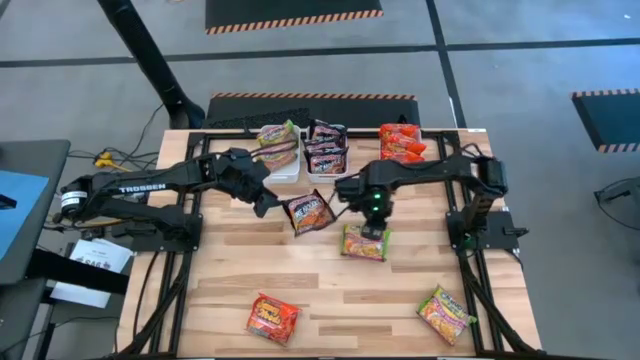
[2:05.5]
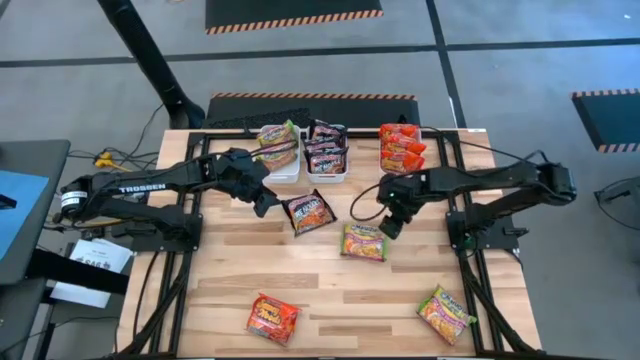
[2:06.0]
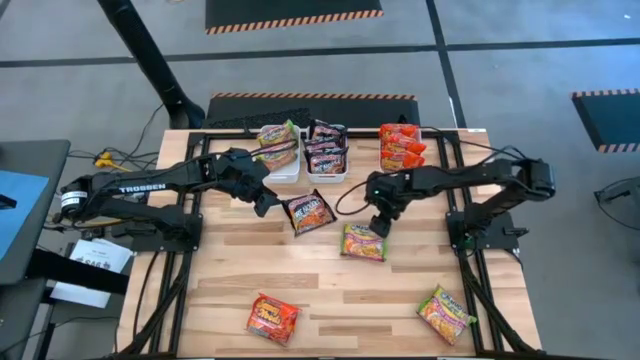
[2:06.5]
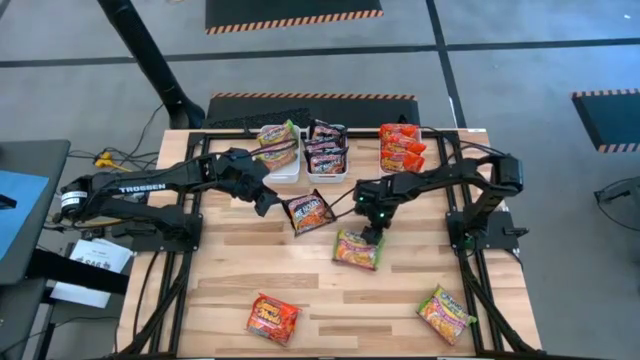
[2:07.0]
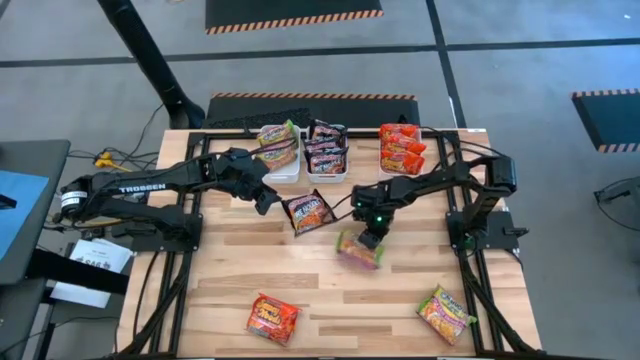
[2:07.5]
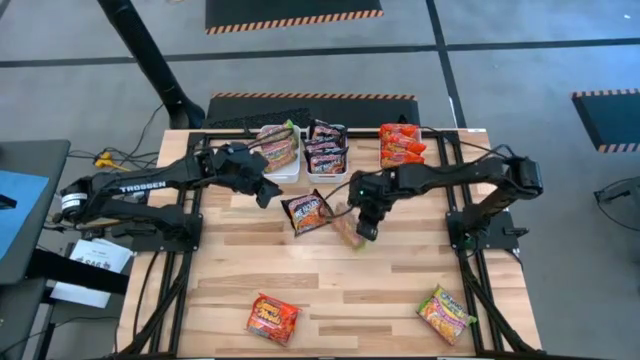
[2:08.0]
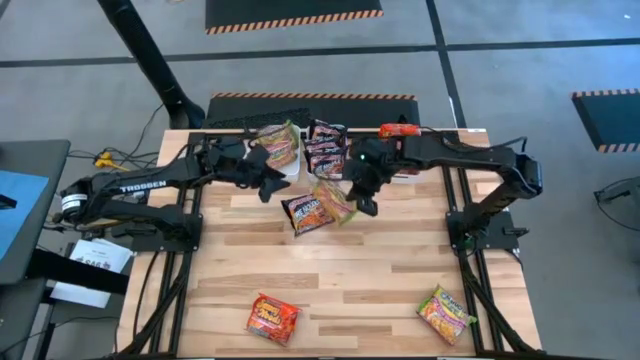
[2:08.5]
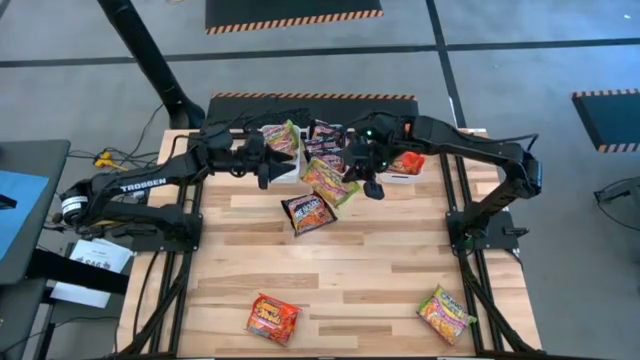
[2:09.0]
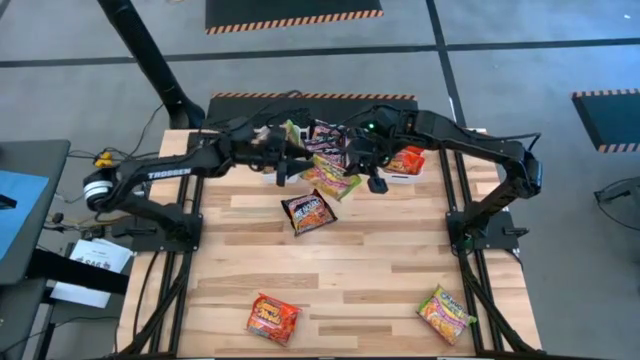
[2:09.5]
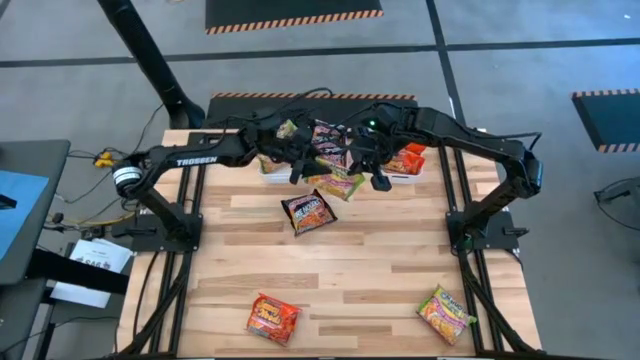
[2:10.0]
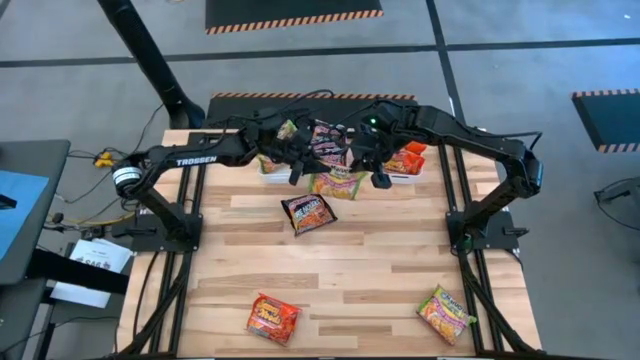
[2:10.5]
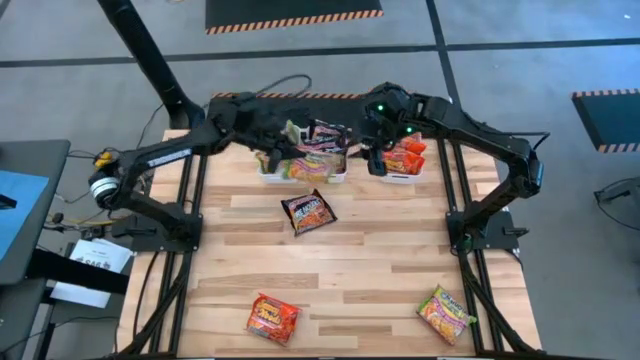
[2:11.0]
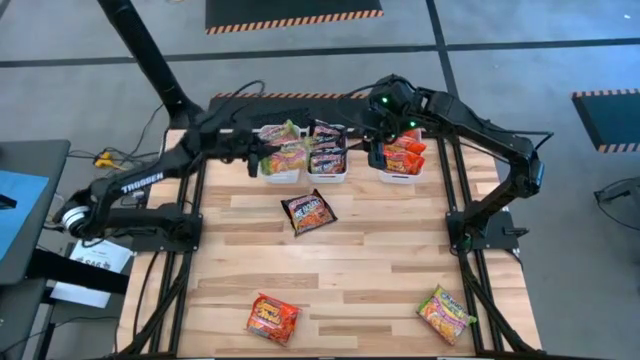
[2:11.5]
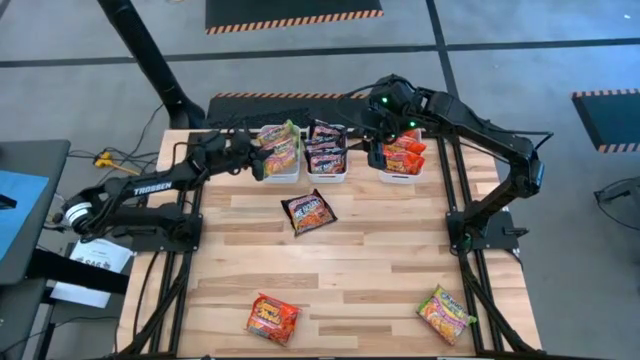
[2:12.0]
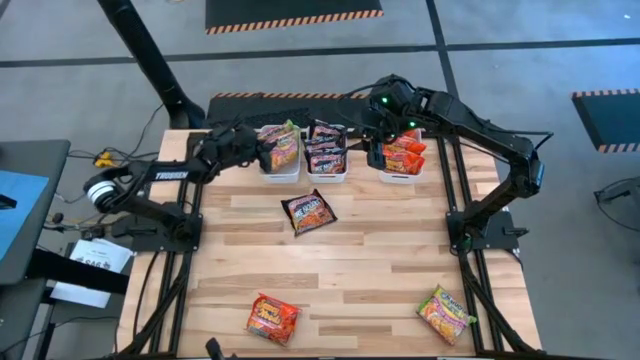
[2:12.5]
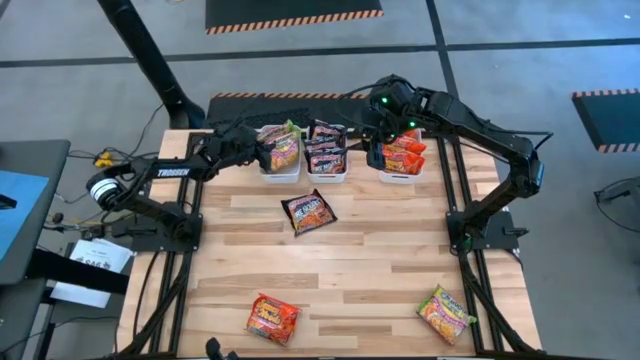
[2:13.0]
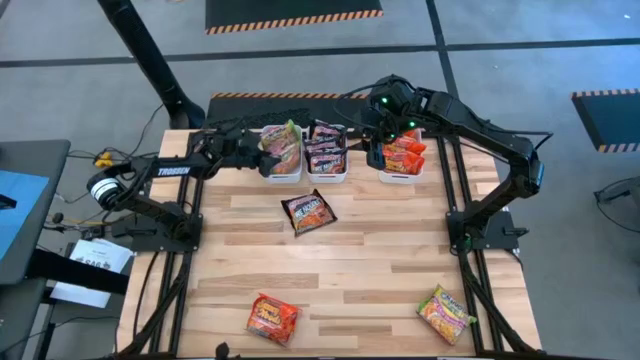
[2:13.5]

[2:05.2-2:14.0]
Task: Sort Maruchan noodles
Put the green noodle pack into the left white bin

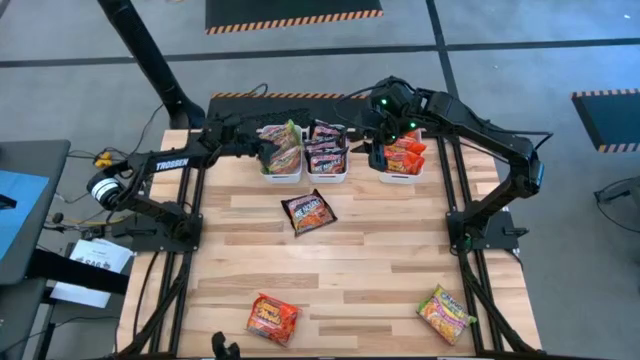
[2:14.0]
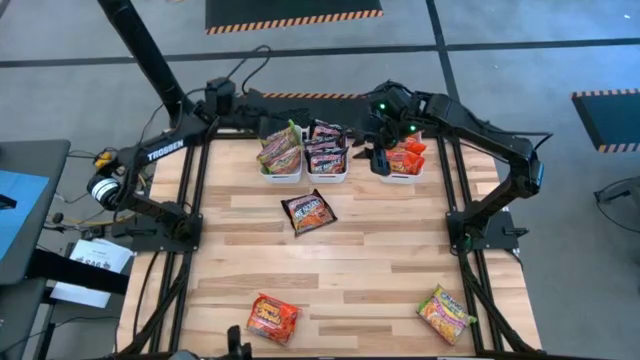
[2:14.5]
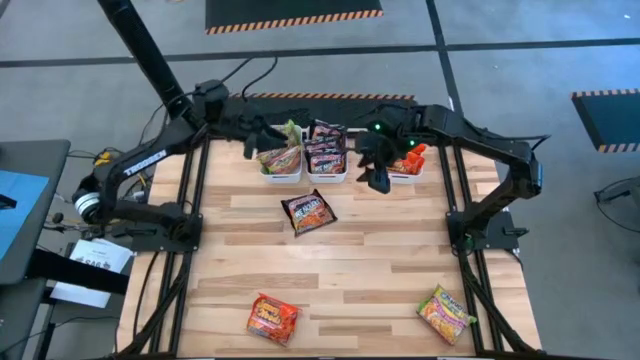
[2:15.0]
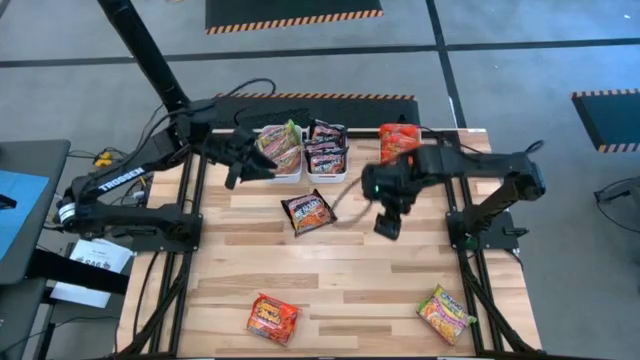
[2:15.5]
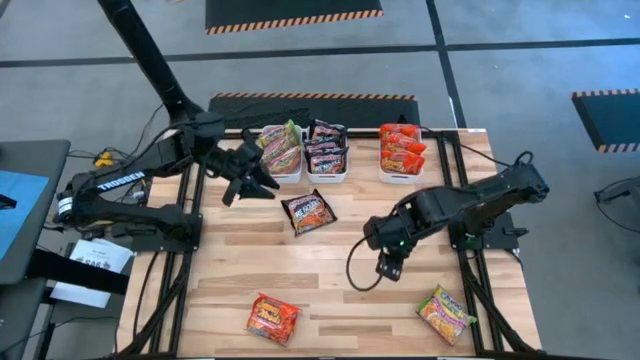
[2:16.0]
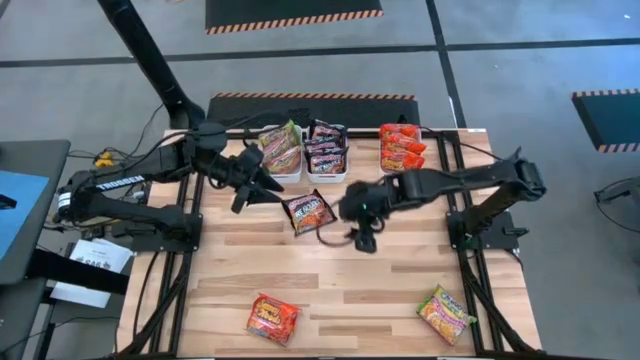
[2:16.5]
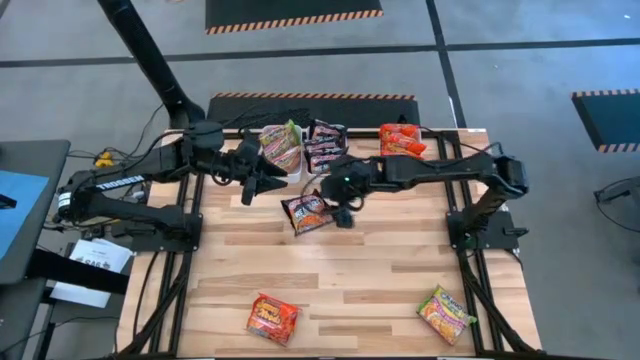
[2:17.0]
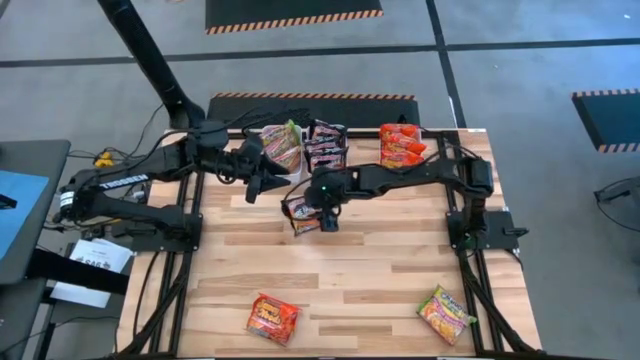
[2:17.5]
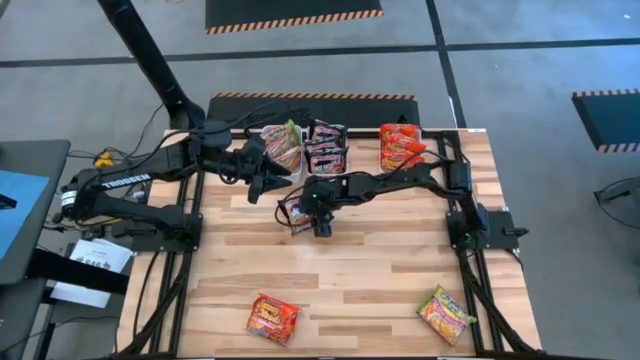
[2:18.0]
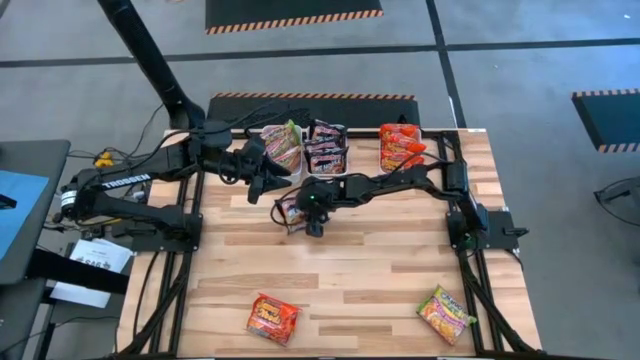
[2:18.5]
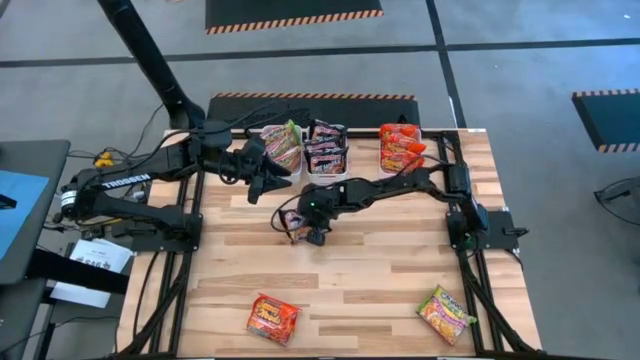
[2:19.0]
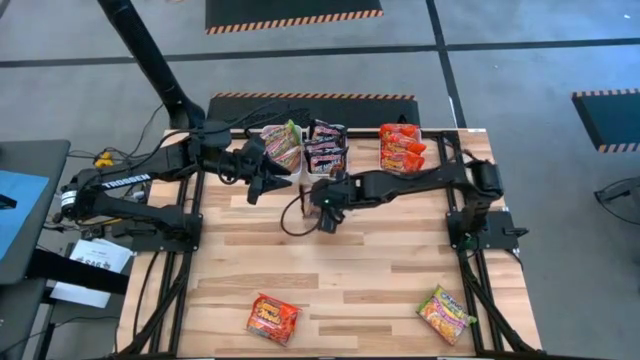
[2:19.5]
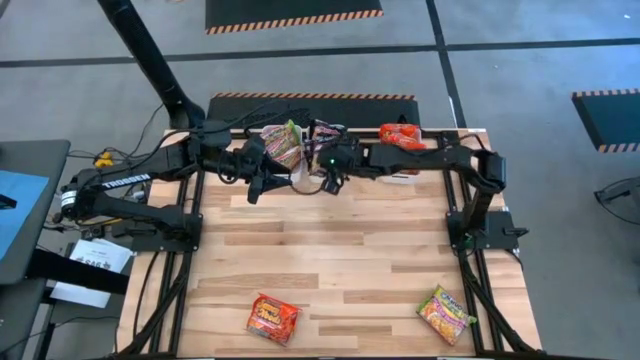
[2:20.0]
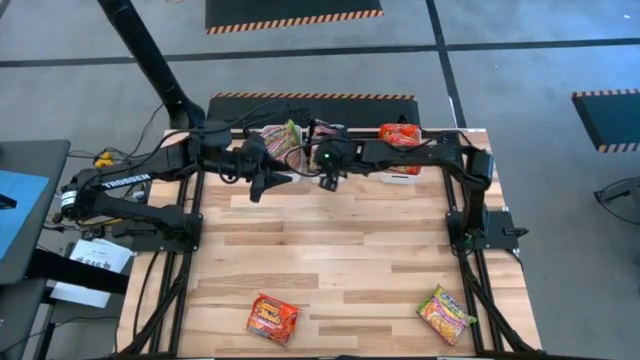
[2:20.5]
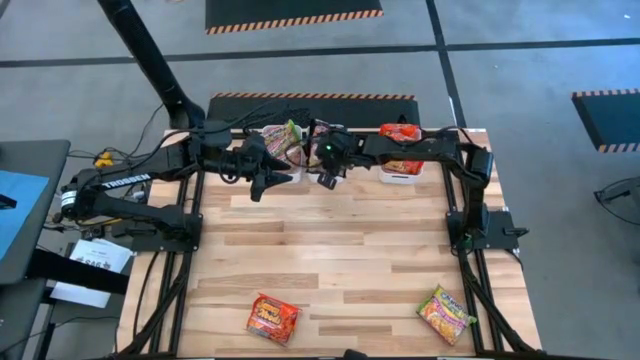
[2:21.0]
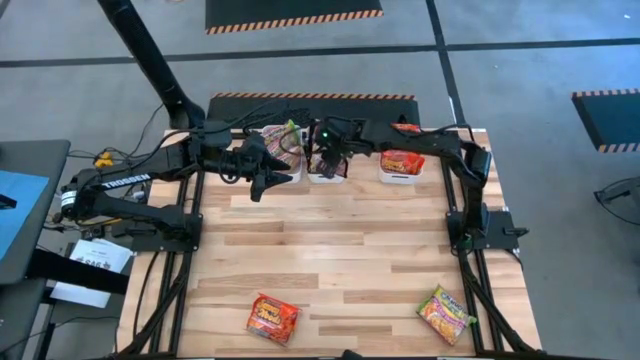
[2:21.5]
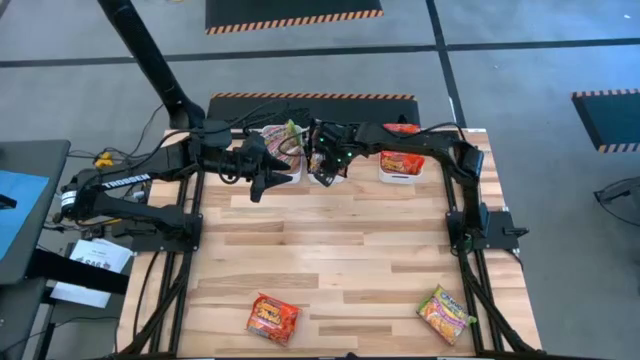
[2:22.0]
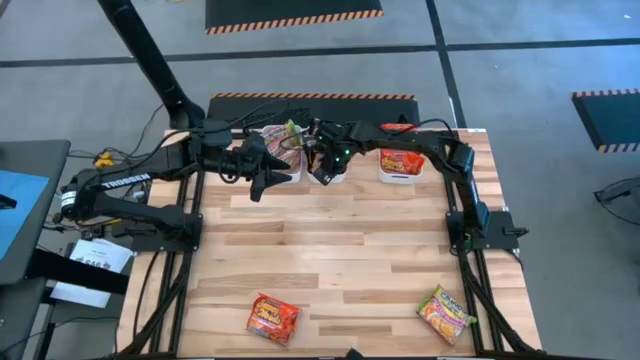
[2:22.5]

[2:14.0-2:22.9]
Put the black noodle pack into the middle white bin

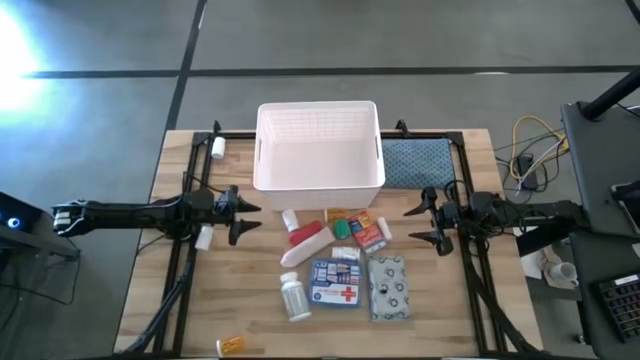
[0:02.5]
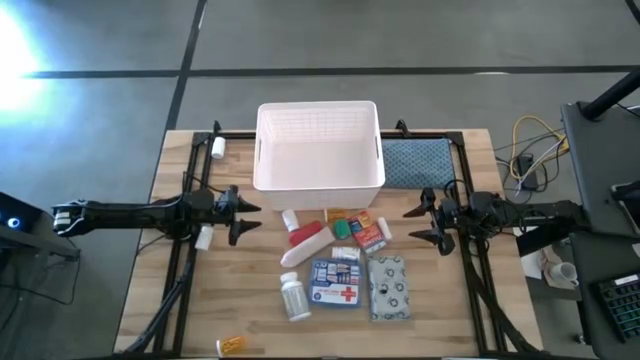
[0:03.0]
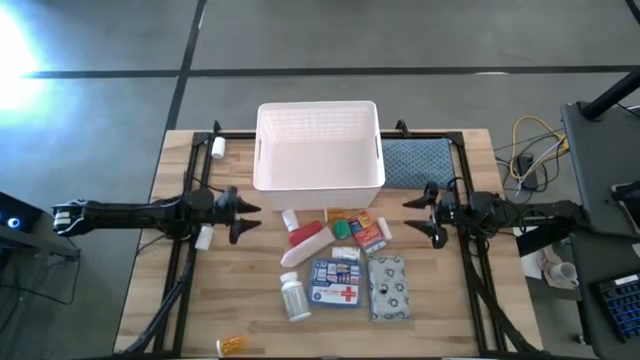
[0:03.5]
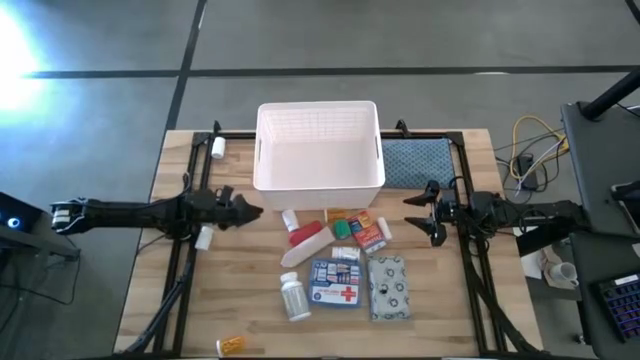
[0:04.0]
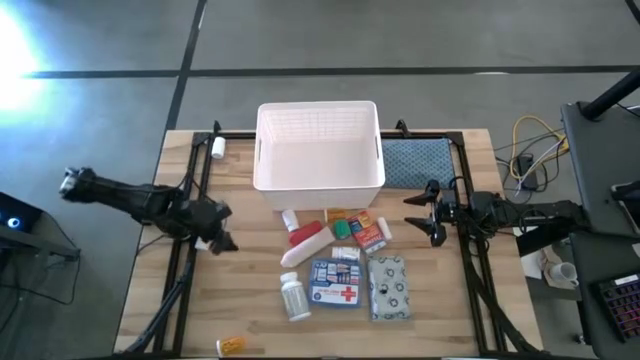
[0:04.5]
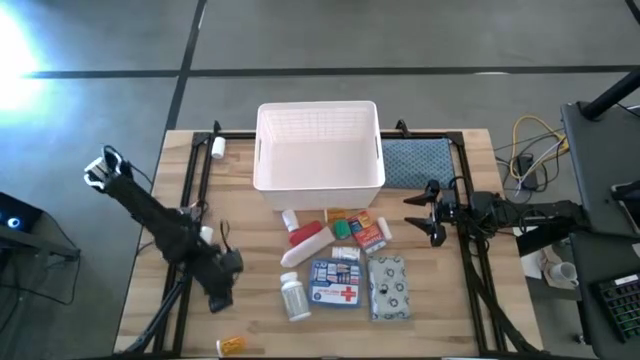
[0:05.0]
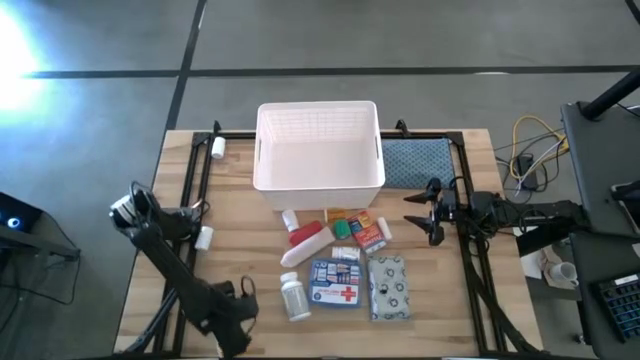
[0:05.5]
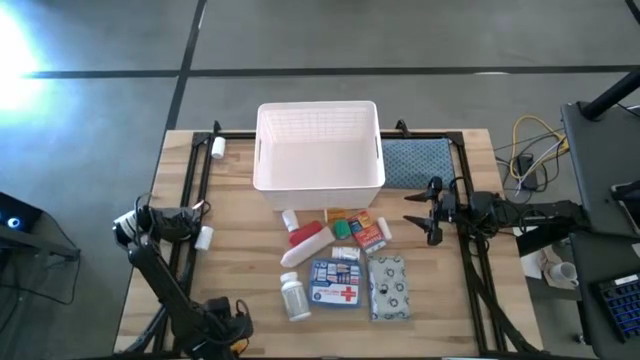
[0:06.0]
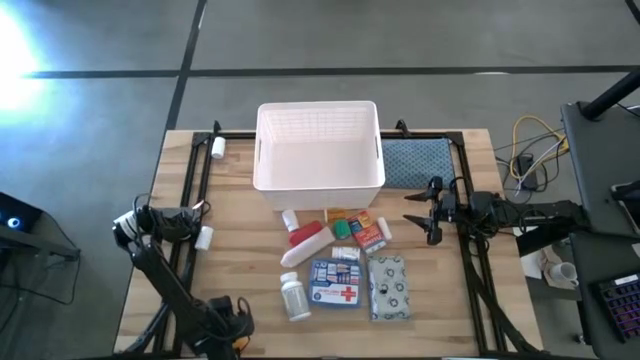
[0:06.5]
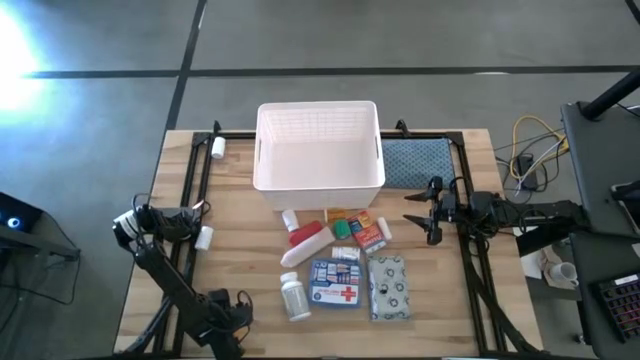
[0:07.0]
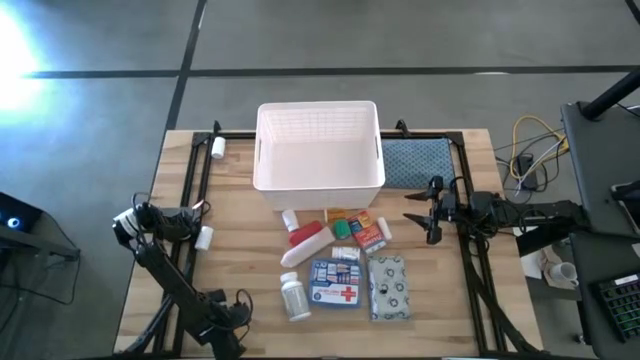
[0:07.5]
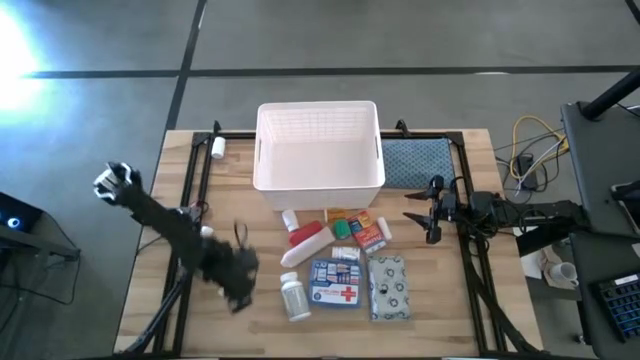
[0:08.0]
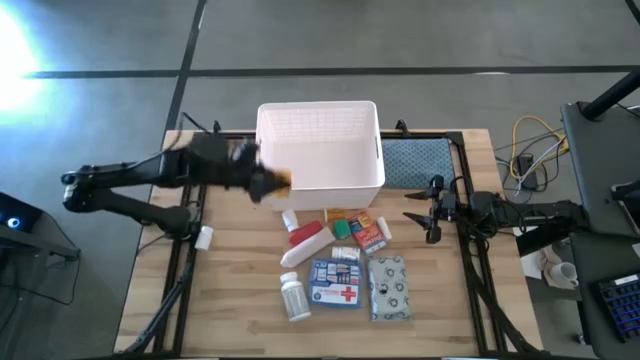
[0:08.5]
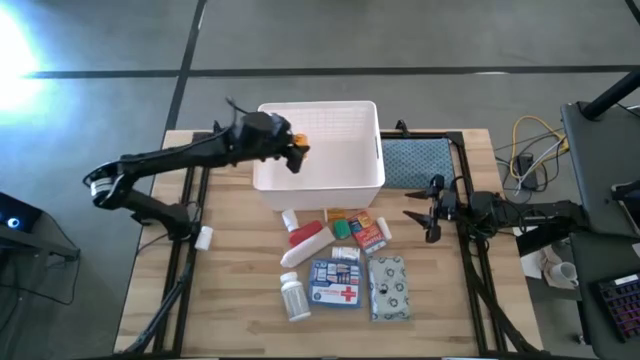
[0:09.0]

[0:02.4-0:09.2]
Task: Pick & place medical supplies in basket/bin
Put the orange pill bottle into the white container
